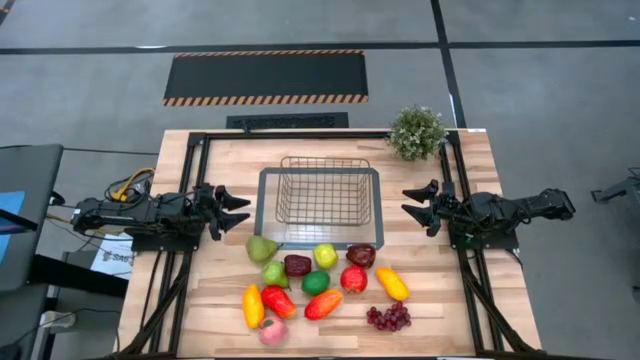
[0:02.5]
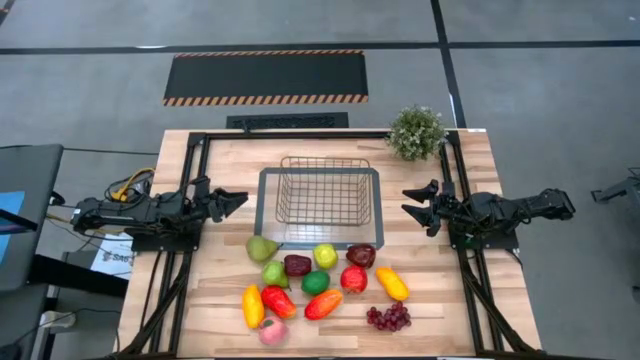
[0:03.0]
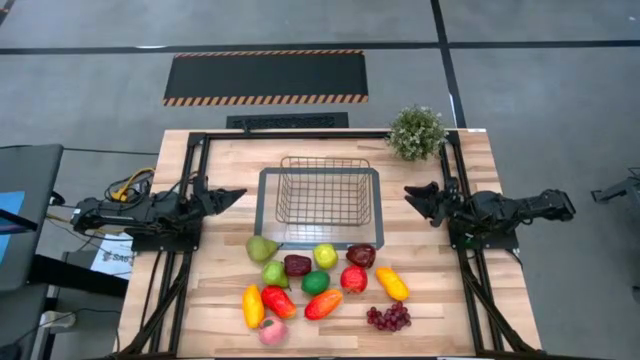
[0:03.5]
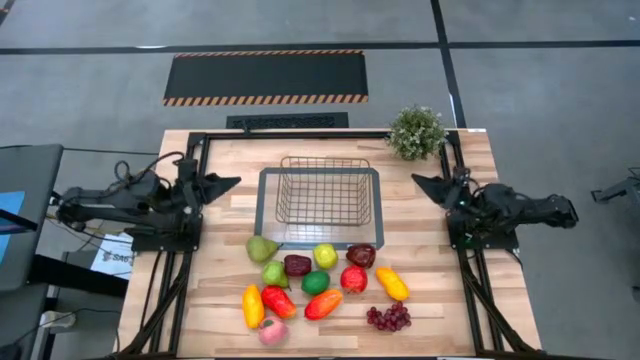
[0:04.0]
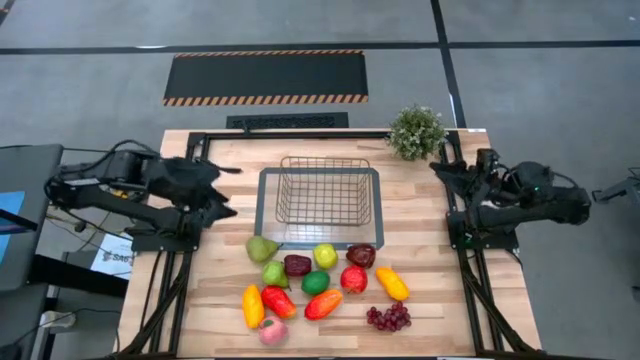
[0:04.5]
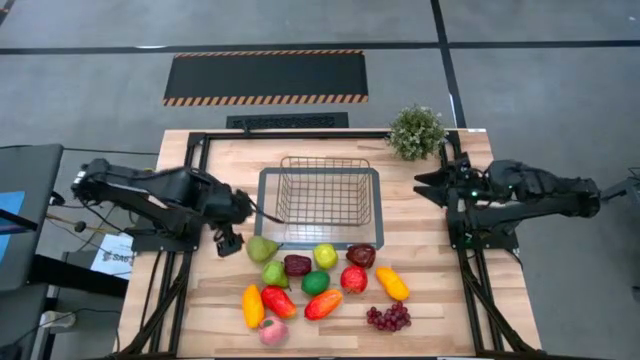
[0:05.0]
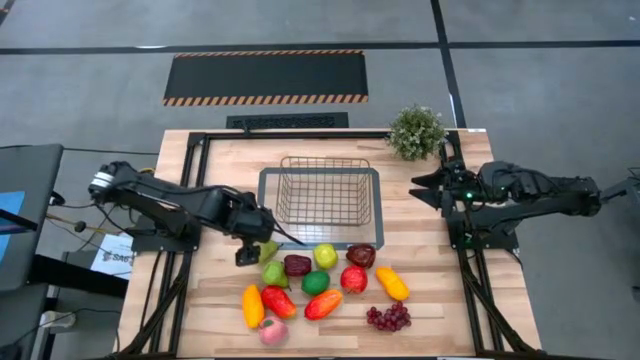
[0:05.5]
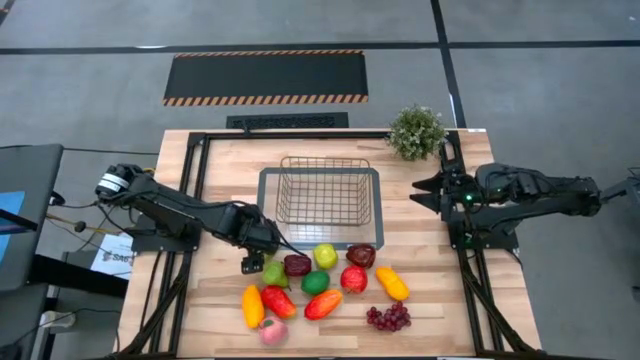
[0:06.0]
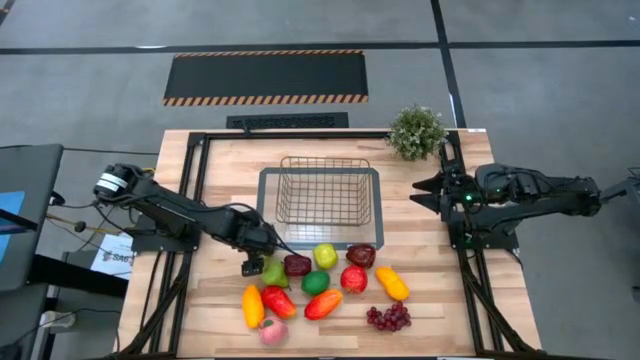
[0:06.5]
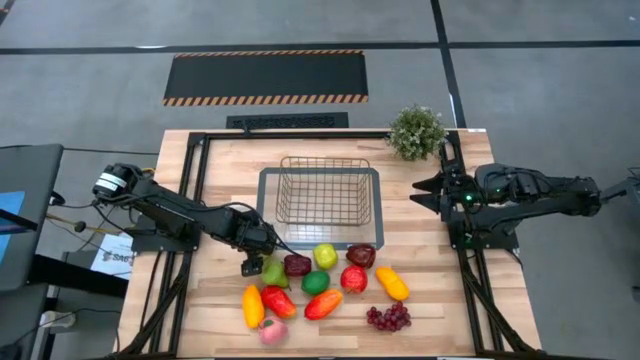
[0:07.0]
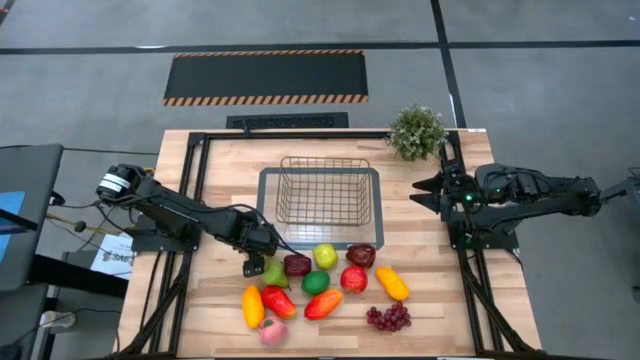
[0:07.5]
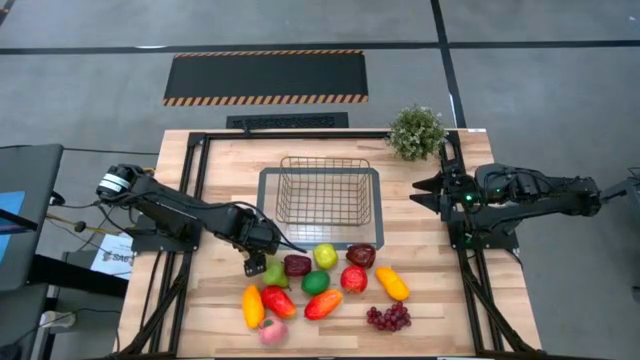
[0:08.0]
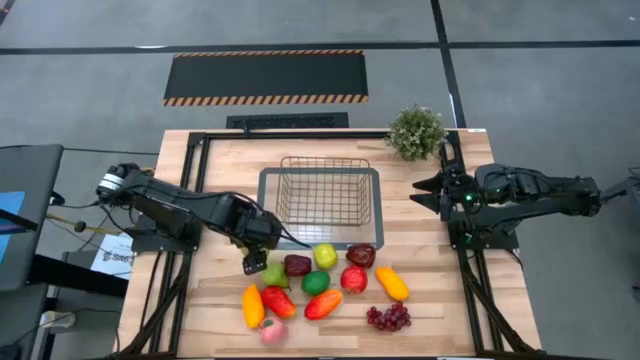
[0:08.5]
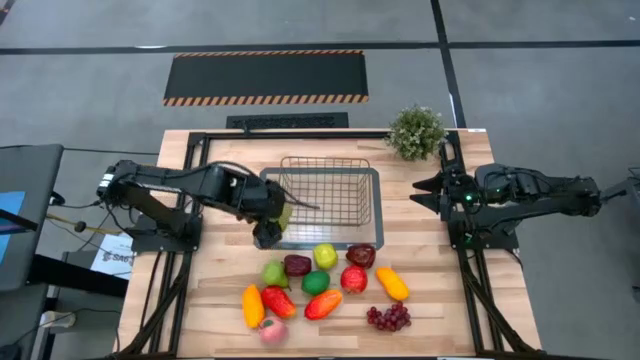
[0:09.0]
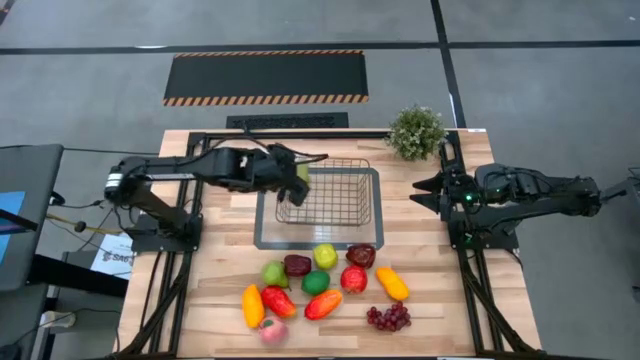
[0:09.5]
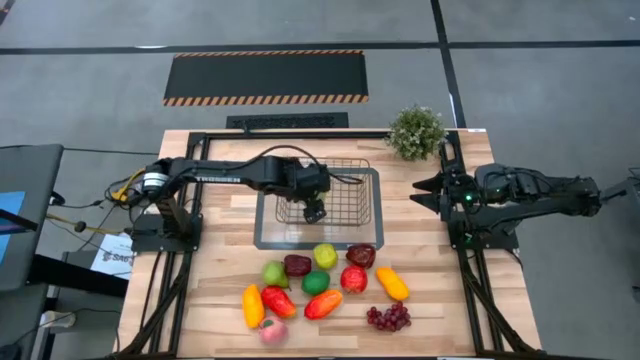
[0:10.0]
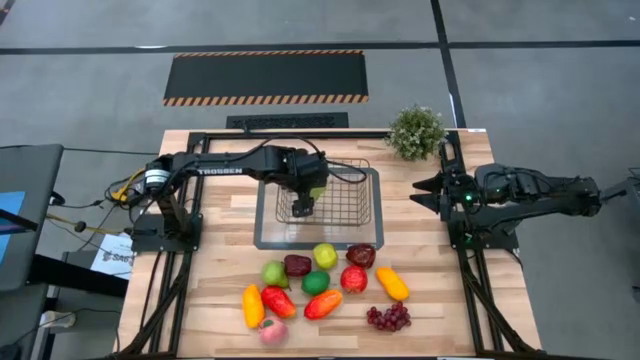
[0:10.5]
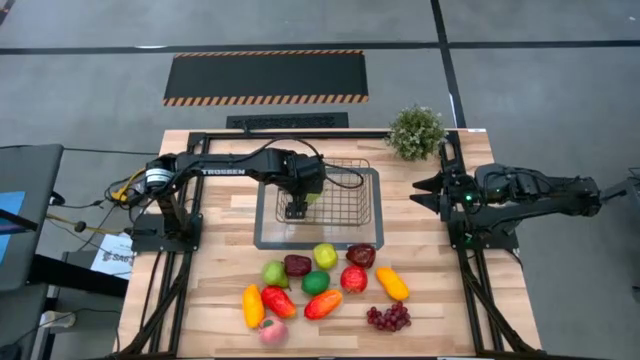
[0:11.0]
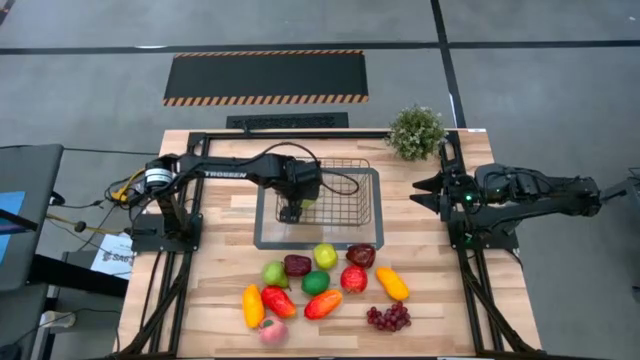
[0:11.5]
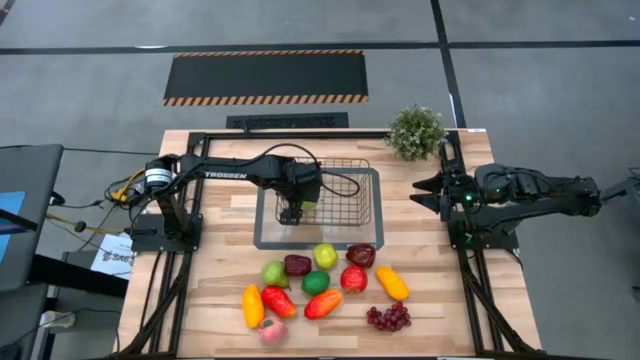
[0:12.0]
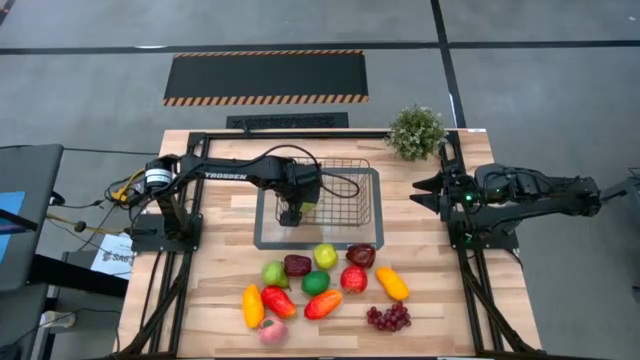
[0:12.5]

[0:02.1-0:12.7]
Task: Build produce basket
Put the top green pear into the bin

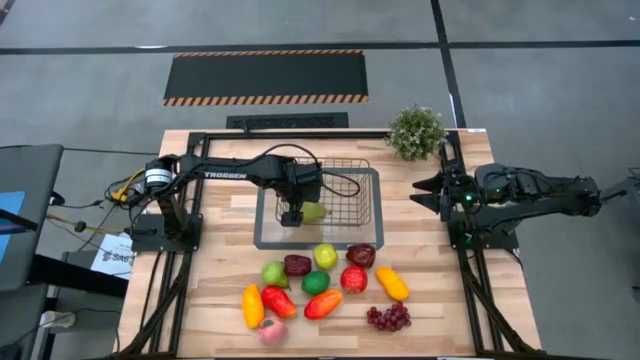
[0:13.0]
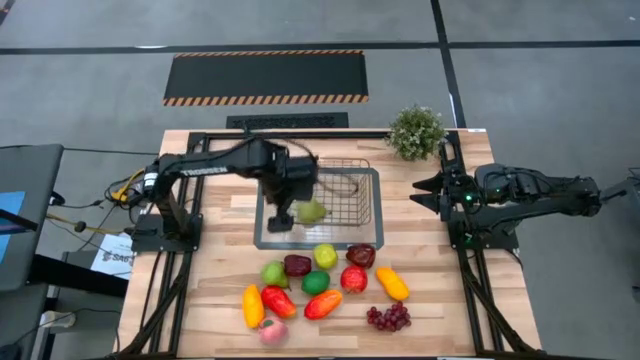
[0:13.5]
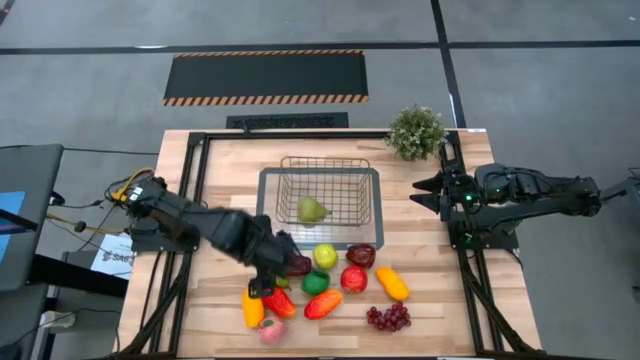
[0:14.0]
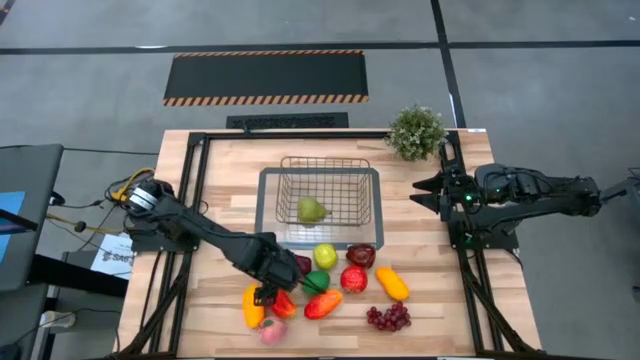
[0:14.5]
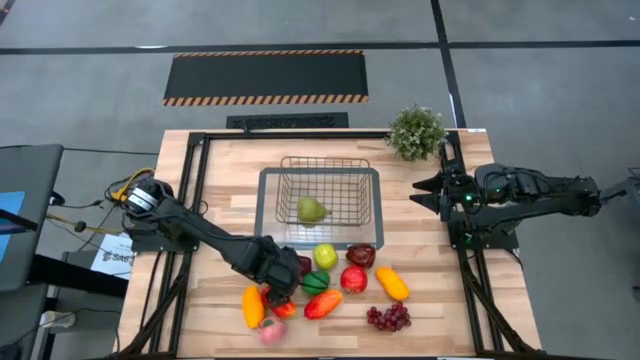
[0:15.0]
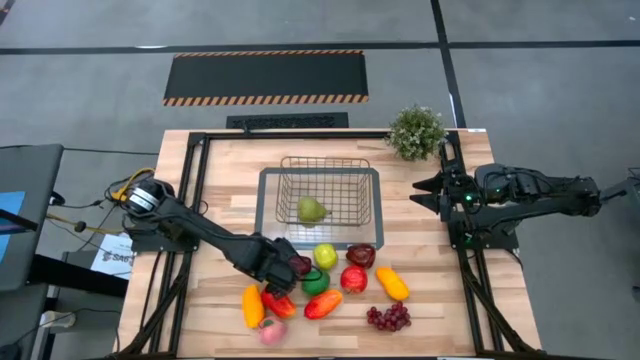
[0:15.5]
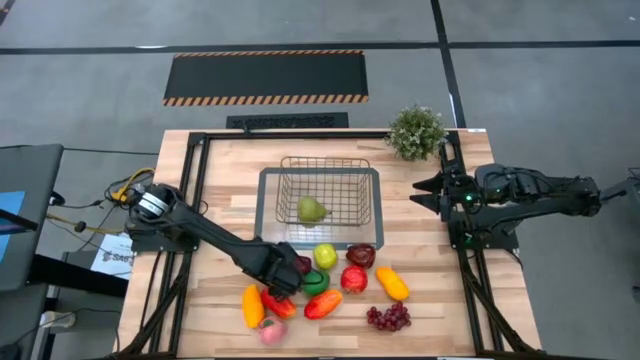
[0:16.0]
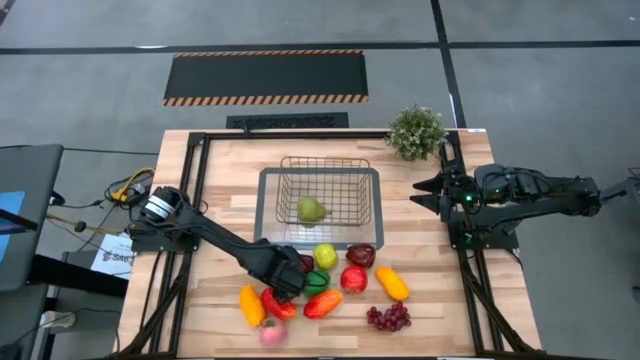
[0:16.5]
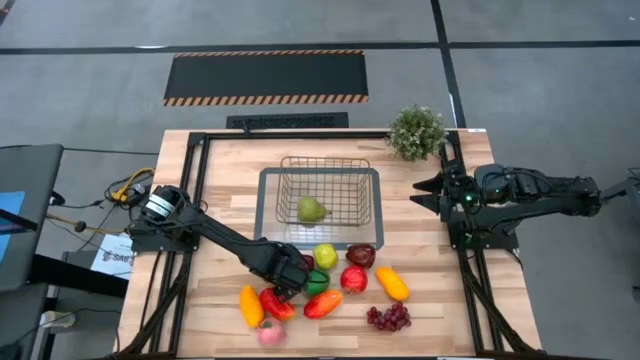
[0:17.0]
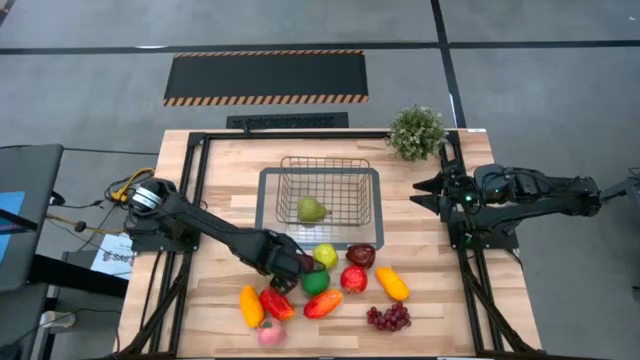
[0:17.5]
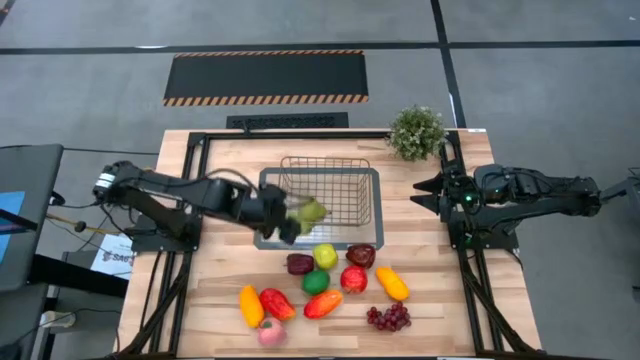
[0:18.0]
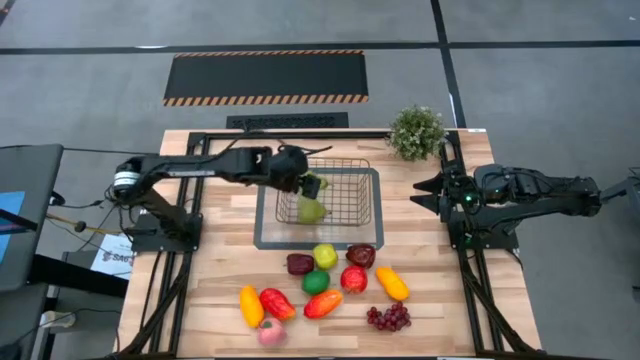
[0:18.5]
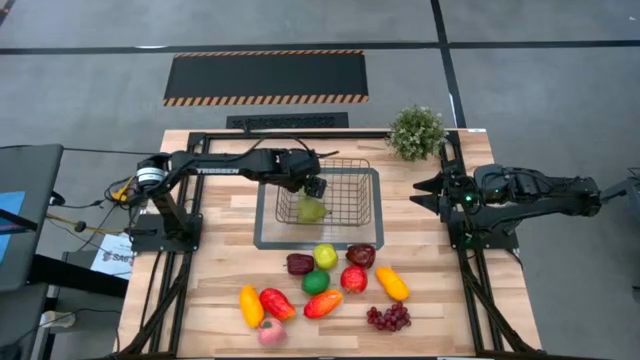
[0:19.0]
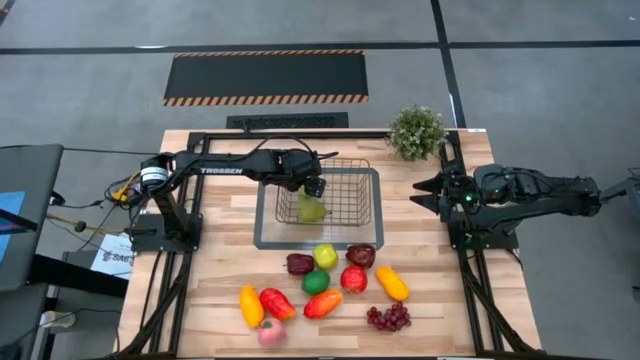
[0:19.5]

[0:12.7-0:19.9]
Put the green pear into the bin

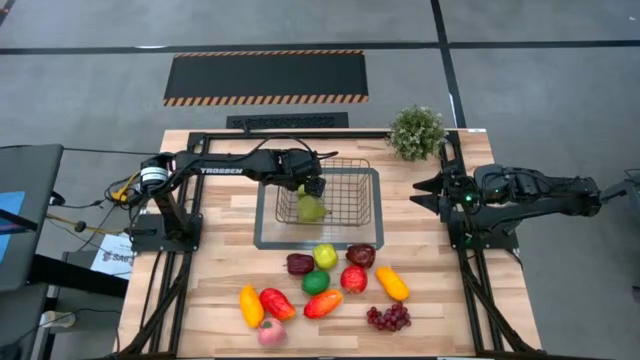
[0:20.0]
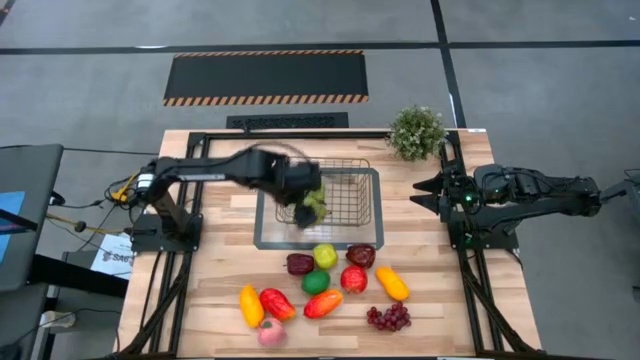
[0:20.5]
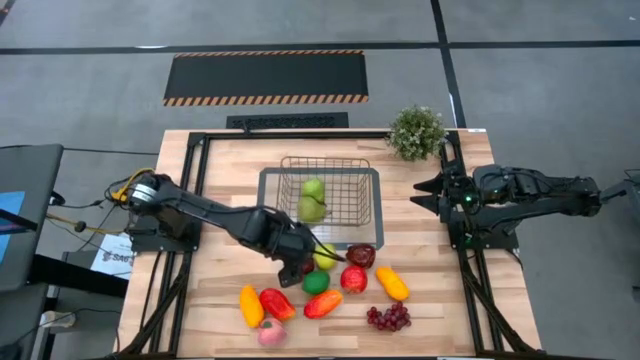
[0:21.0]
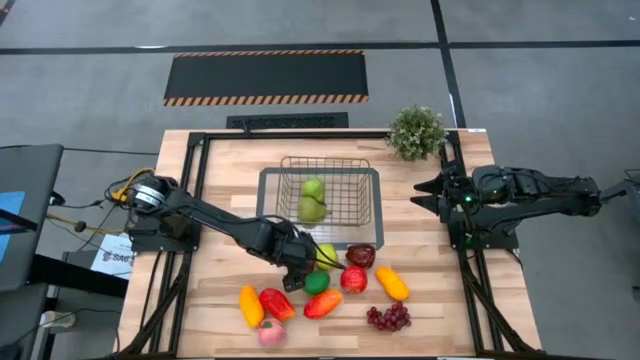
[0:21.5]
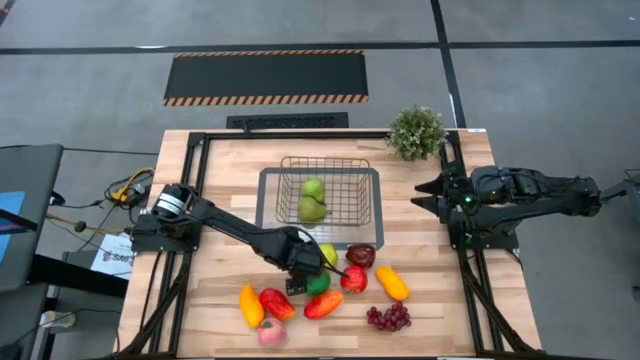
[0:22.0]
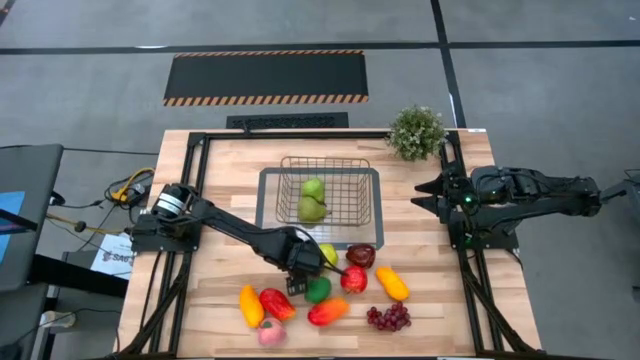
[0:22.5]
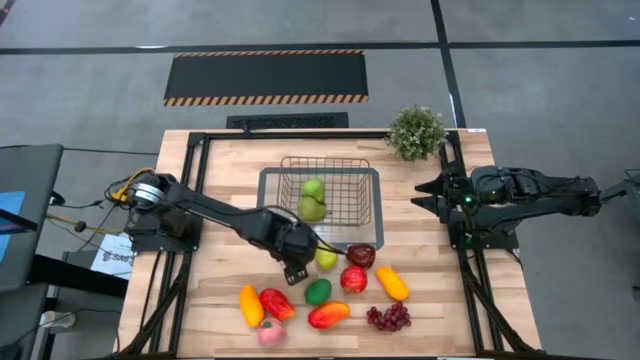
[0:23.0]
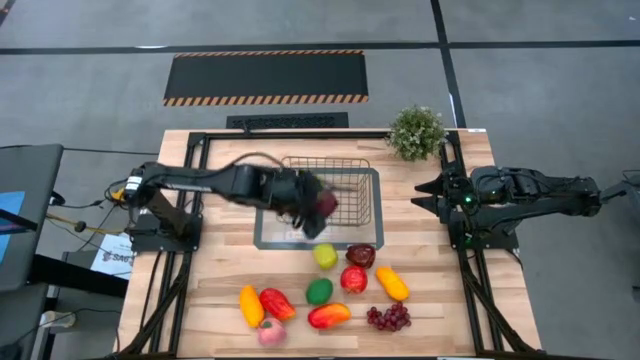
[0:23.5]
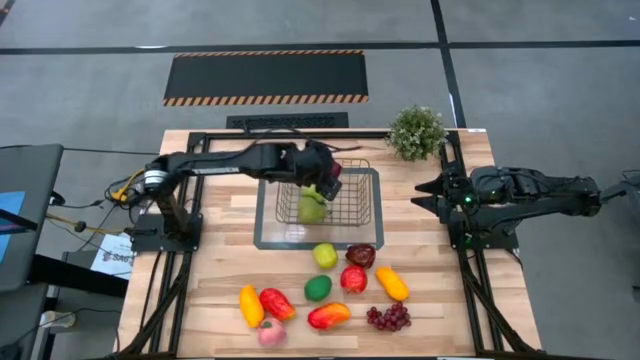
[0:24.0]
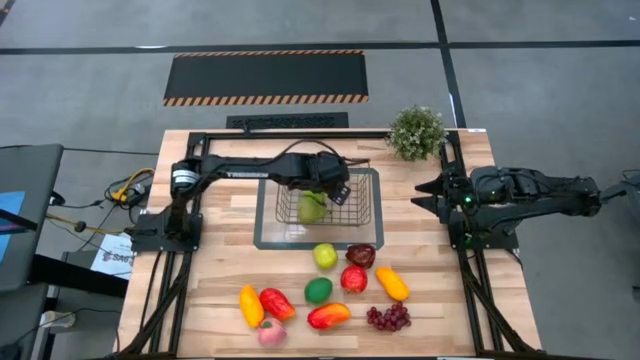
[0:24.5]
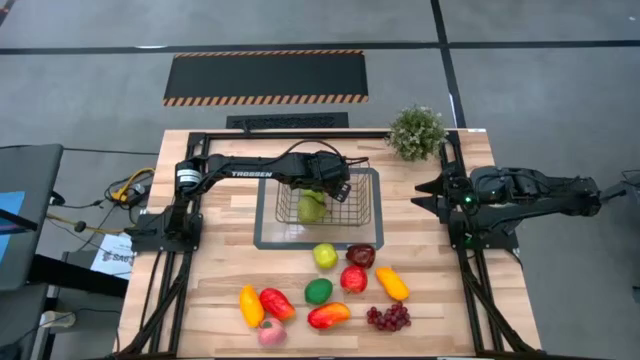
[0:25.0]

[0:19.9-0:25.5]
Put the left dark red apple into the bin
